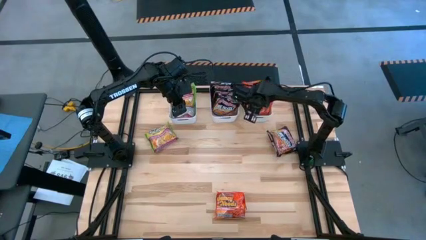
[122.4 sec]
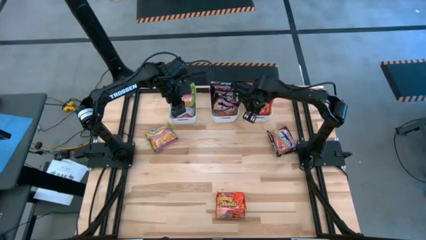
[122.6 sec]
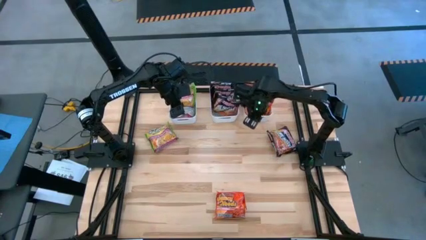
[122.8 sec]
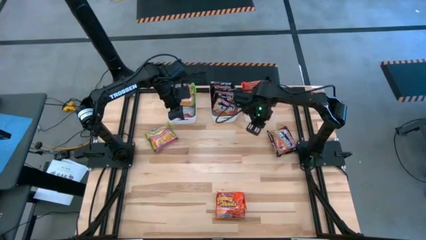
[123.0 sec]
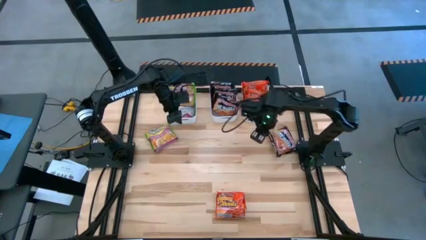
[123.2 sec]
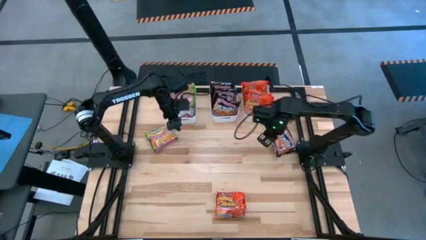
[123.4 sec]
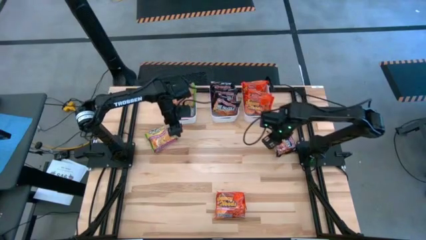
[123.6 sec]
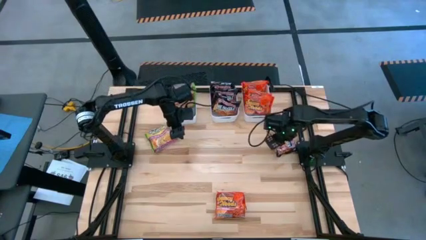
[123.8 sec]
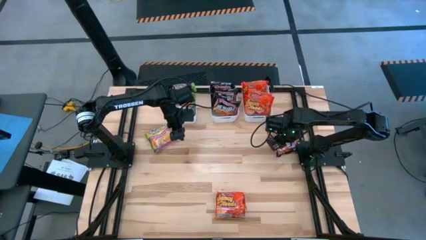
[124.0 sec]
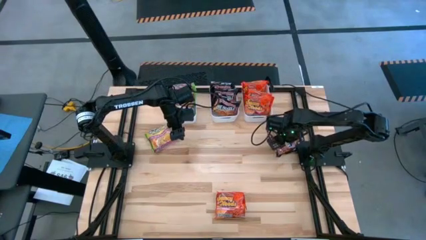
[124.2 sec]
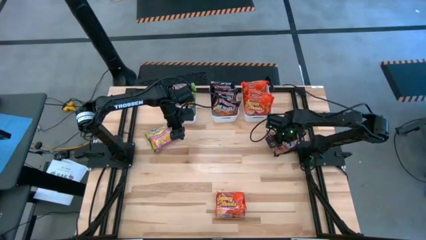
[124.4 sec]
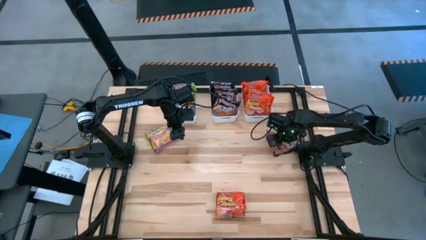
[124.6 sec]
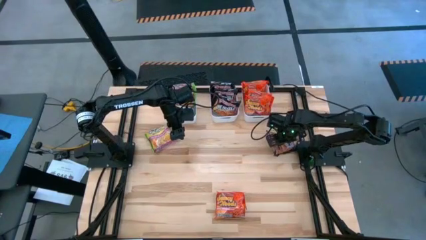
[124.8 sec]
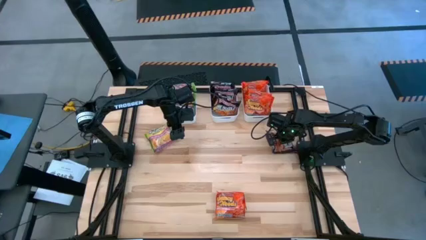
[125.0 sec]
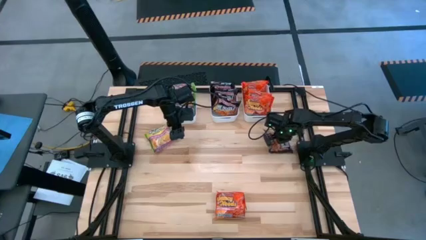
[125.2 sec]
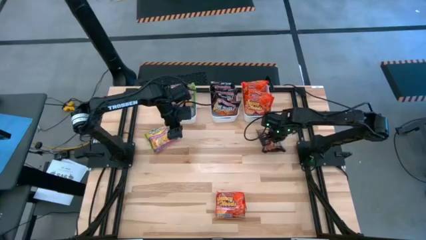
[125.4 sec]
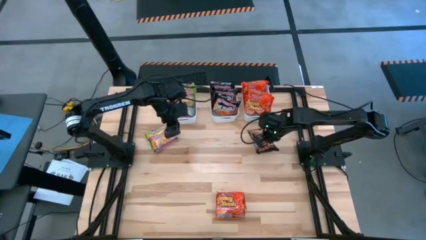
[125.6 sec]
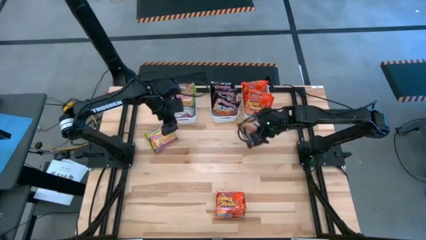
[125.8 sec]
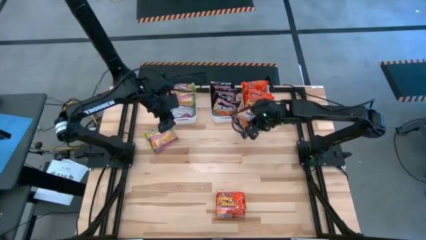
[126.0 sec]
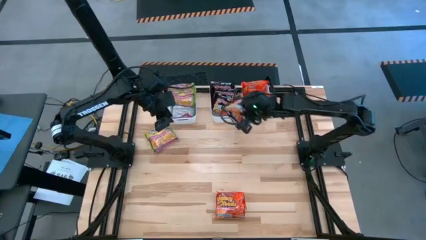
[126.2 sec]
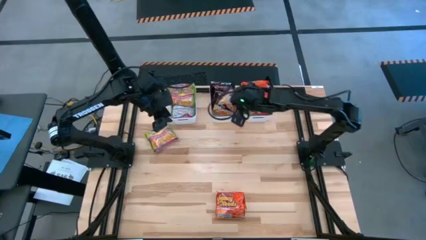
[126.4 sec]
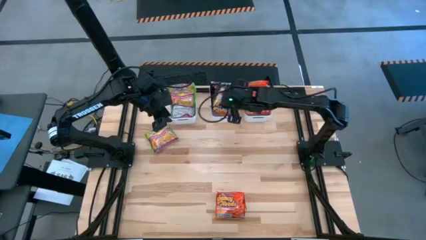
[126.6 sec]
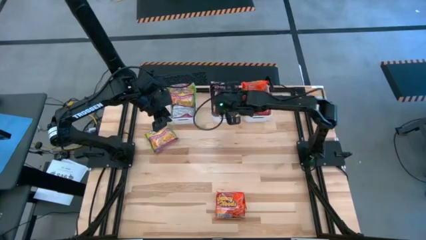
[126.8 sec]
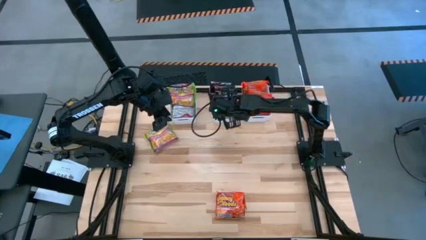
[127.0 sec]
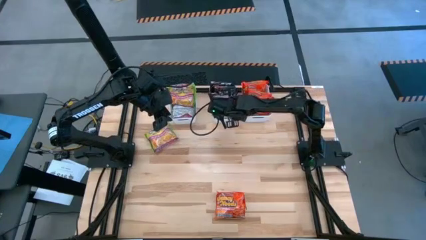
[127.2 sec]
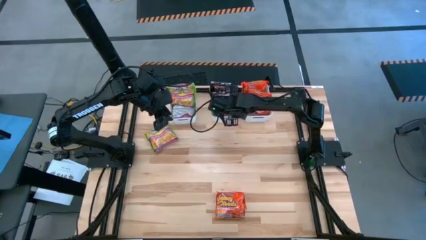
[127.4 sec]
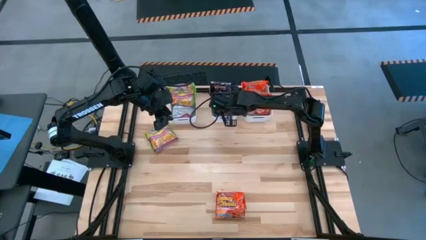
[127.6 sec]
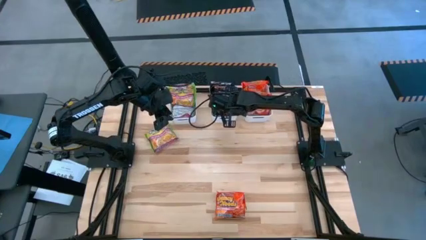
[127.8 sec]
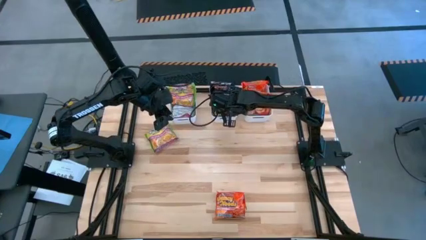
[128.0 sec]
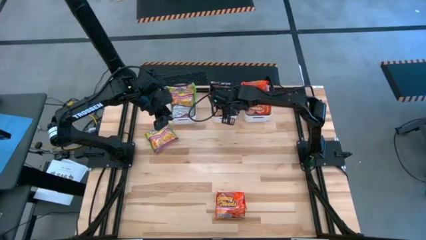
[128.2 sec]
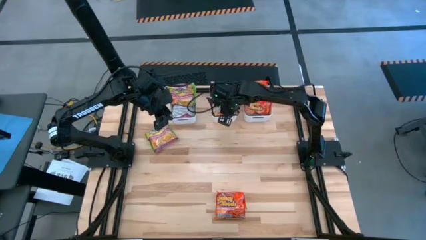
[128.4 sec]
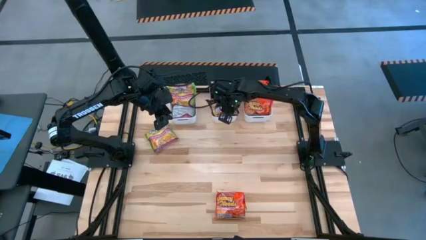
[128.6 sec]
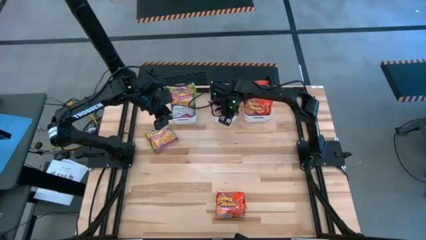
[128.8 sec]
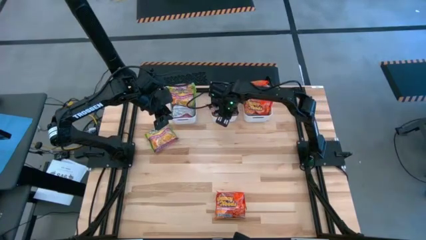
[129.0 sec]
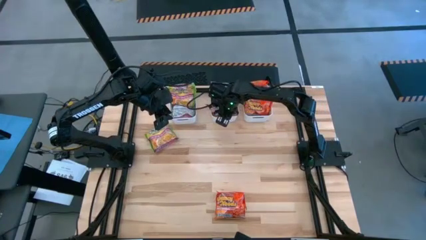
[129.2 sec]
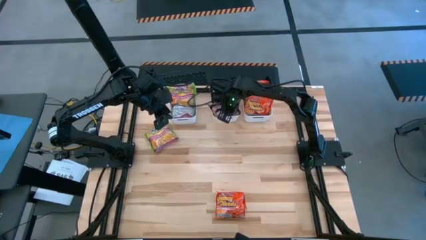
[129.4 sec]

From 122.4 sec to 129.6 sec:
Task: Sort Maruchan noodles
Put the black noodle pack into the middle white bin

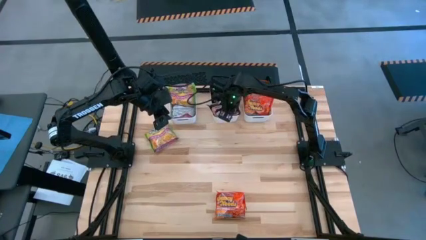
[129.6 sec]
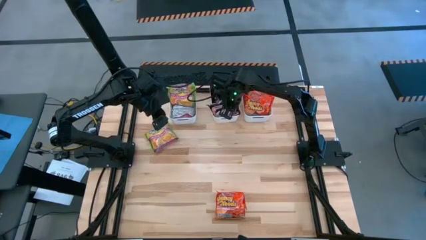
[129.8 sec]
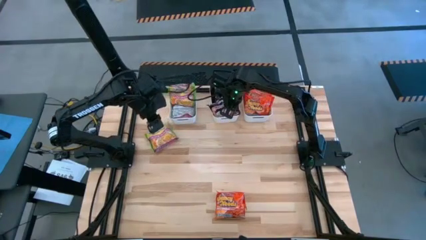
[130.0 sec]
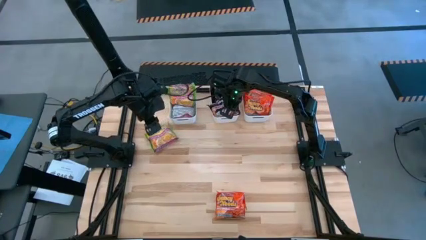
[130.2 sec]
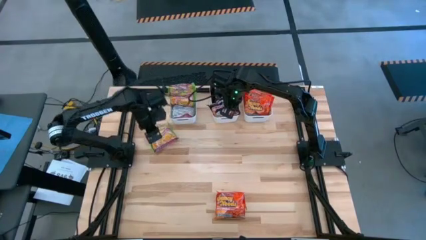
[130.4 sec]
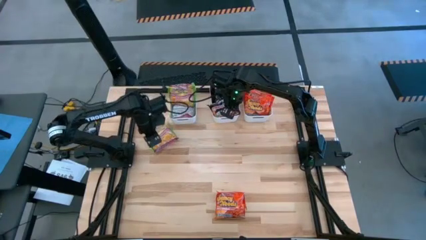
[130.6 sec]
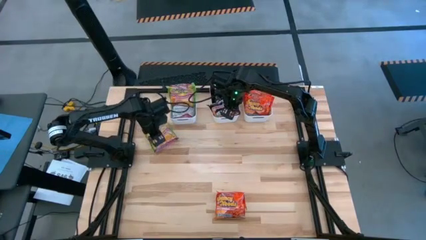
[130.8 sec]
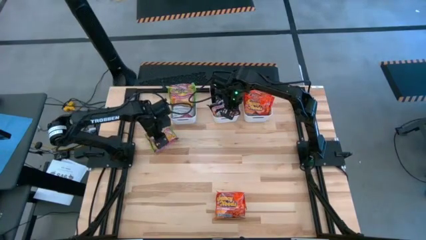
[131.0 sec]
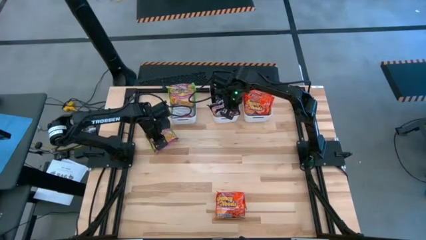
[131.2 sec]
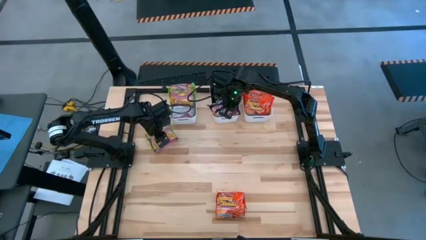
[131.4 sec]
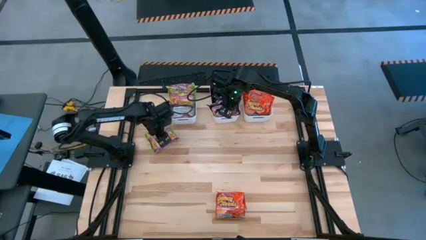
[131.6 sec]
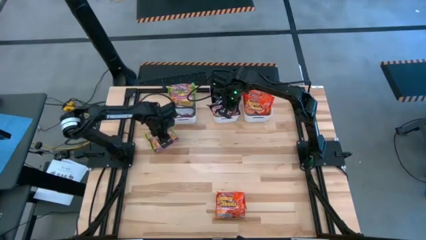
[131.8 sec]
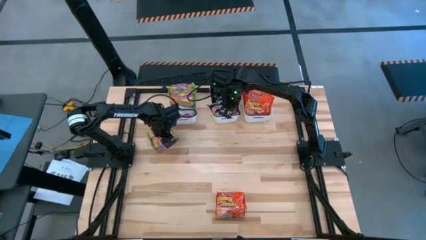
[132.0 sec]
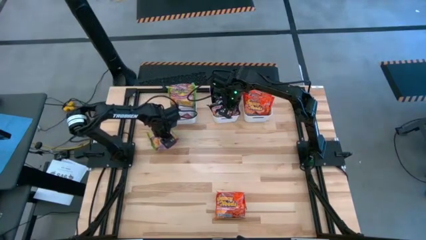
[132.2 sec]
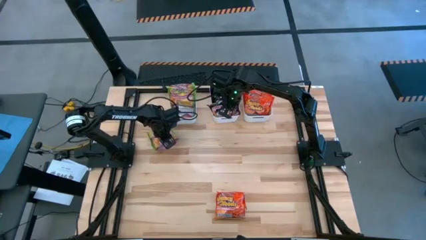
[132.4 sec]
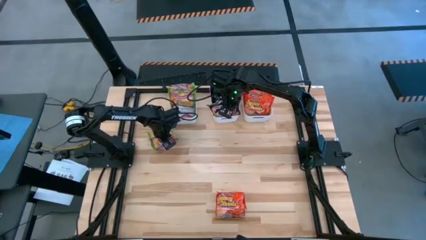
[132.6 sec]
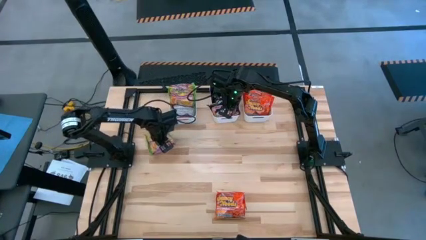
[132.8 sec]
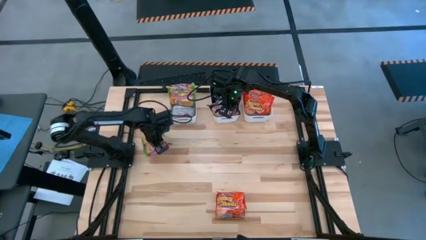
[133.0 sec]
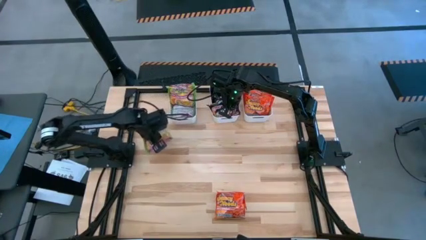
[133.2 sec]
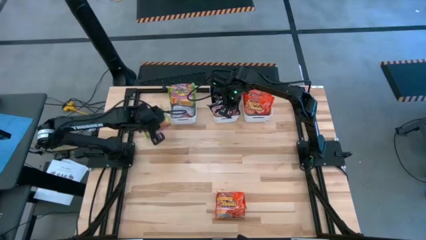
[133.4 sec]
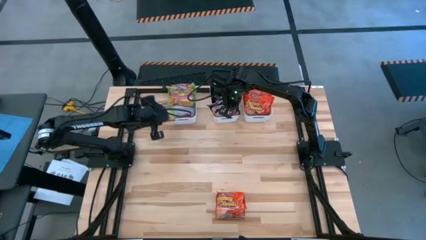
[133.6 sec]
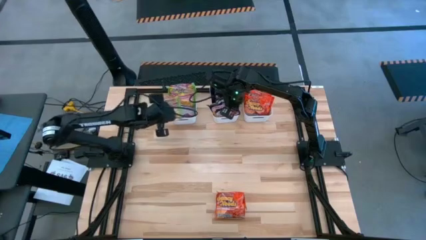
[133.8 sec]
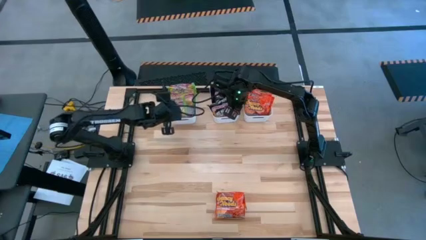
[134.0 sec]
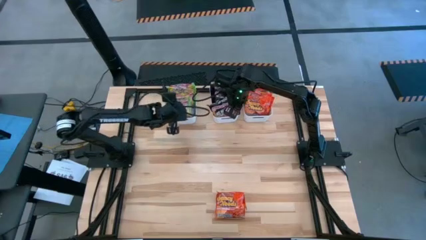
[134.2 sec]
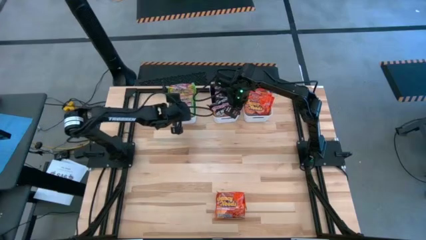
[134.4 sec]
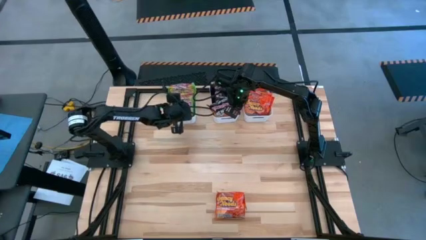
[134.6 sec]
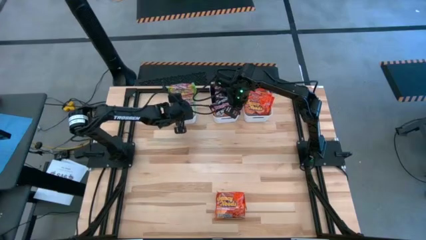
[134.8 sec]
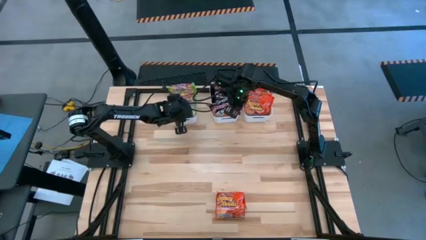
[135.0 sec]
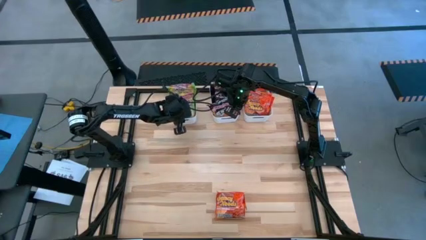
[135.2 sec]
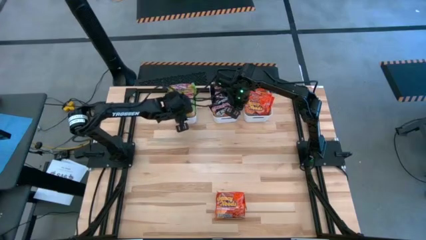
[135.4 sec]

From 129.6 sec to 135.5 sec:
Put the green noodle pack into the left white bin

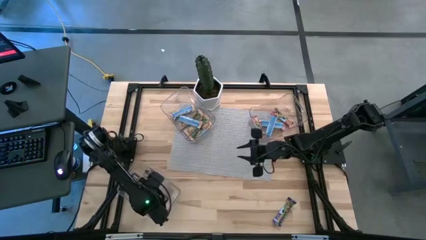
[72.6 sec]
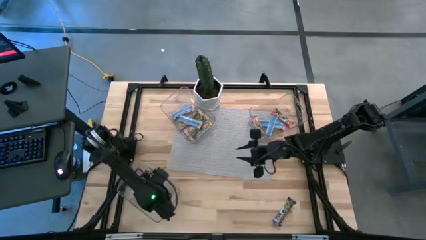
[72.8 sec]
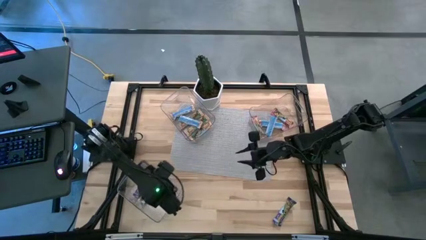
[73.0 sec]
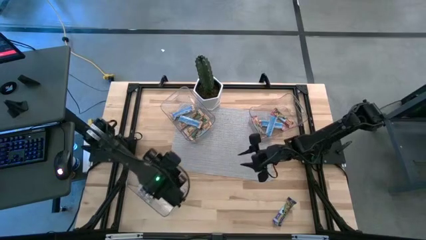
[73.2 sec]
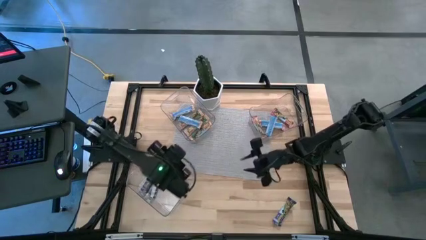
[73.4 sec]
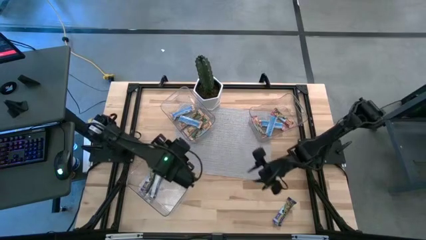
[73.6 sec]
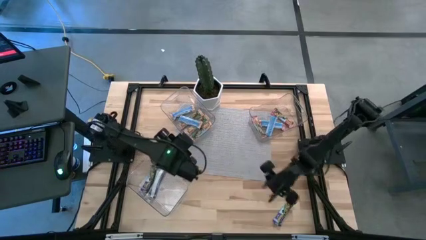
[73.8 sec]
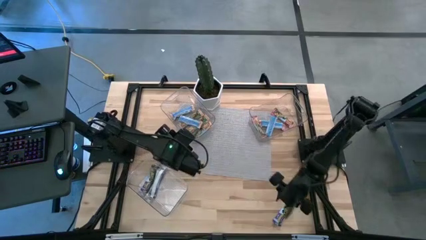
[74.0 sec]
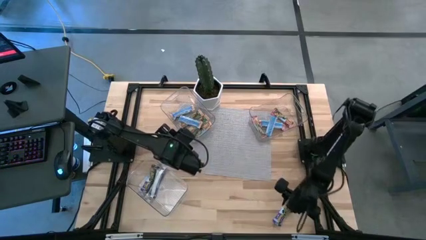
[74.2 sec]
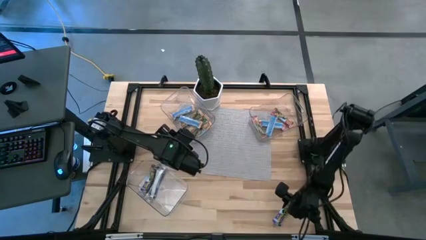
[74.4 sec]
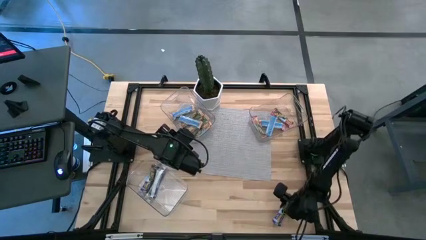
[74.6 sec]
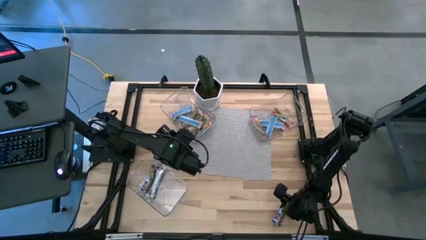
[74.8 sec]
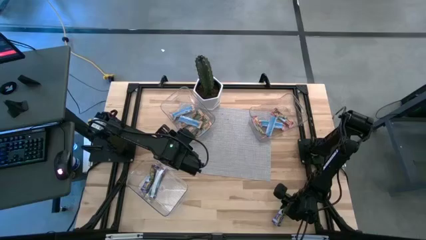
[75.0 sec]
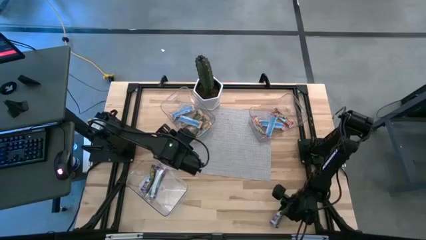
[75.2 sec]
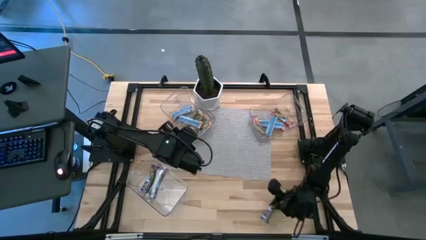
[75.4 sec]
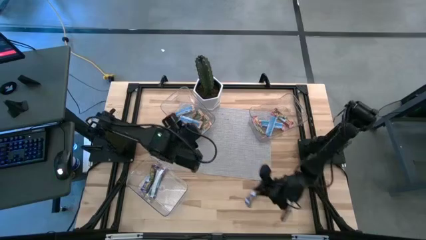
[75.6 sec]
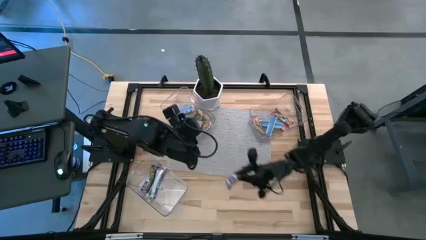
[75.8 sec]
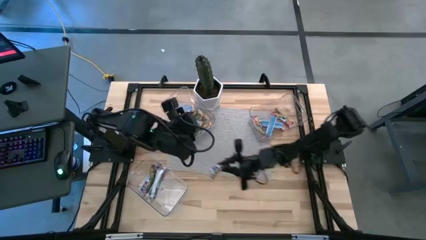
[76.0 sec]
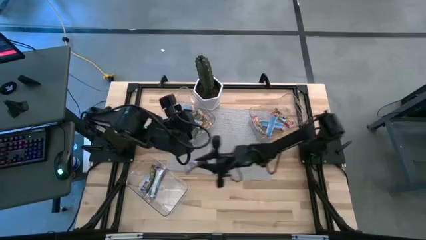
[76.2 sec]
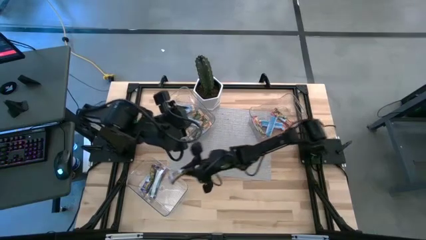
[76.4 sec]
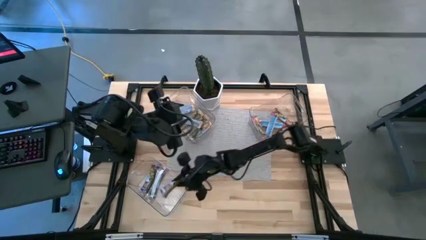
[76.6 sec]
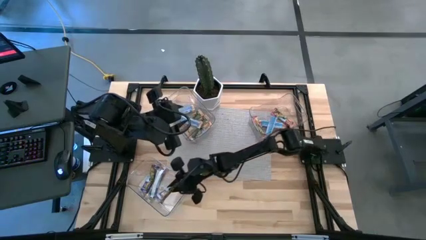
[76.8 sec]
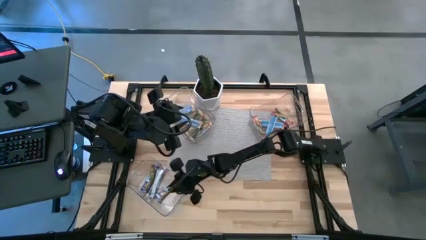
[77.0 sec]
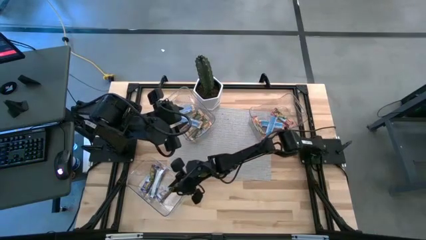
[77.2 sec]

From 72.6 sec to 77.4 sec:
Task: Pick and place Granola Bars by type
Put the blue granola bar into the bottom transparent bin
